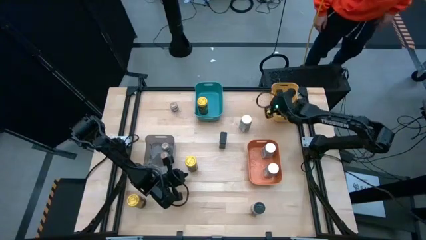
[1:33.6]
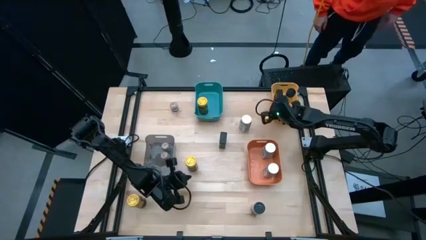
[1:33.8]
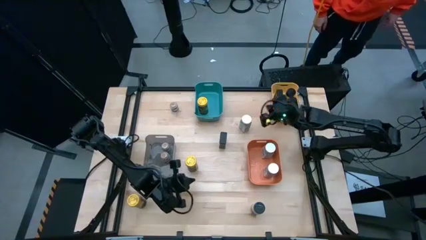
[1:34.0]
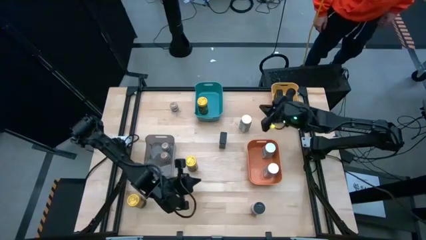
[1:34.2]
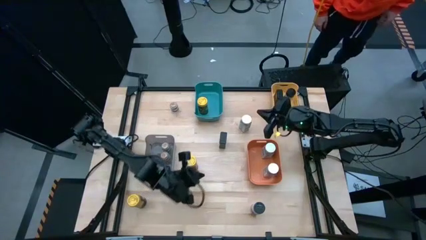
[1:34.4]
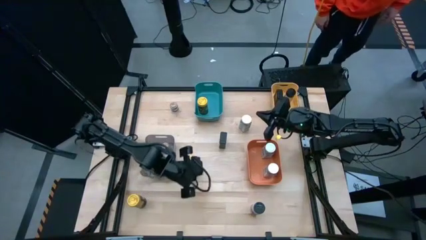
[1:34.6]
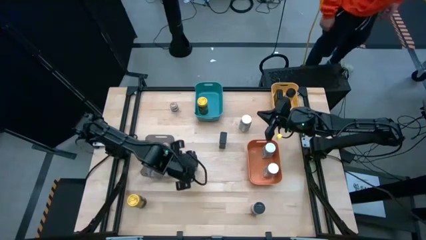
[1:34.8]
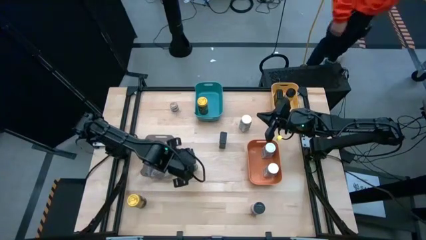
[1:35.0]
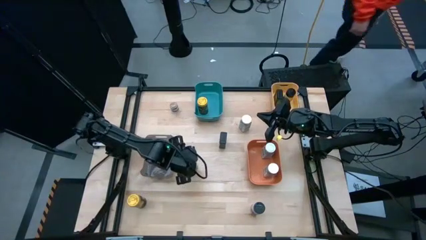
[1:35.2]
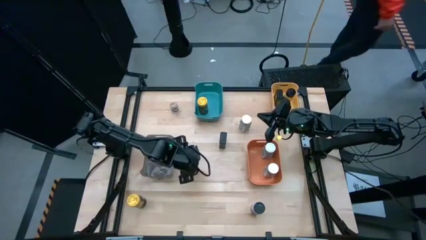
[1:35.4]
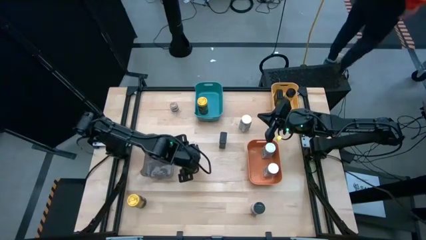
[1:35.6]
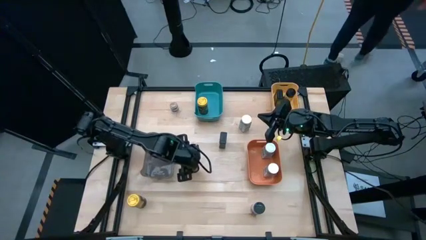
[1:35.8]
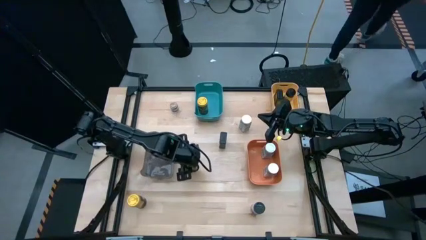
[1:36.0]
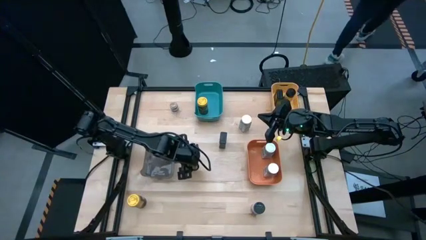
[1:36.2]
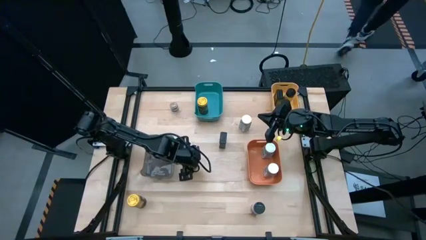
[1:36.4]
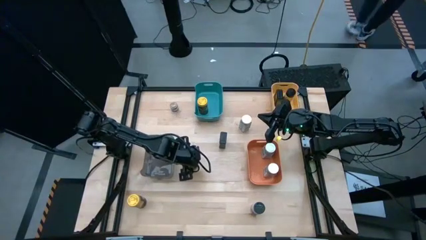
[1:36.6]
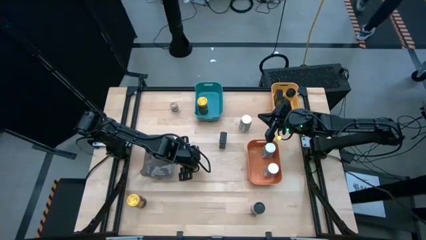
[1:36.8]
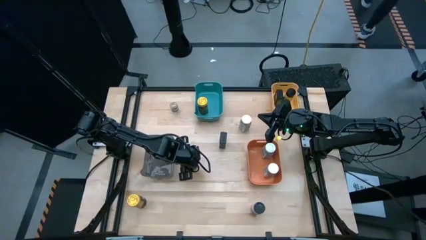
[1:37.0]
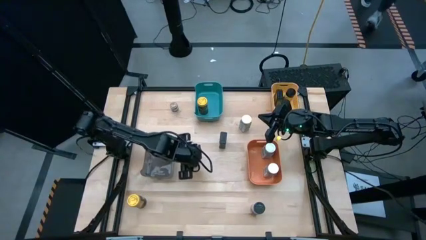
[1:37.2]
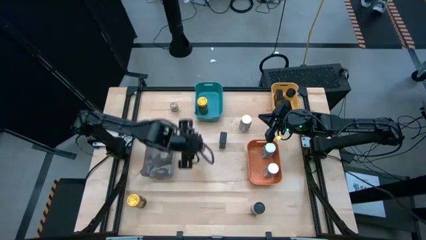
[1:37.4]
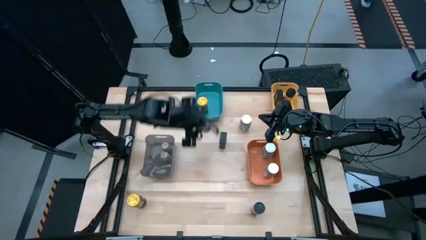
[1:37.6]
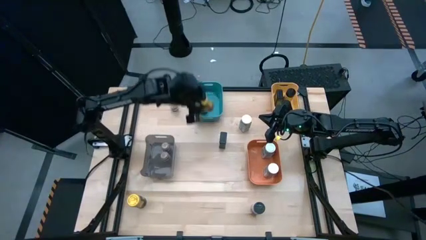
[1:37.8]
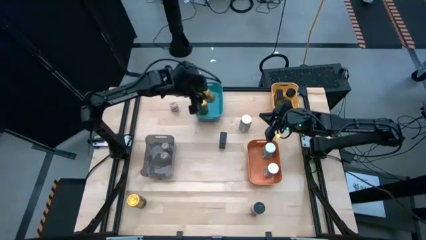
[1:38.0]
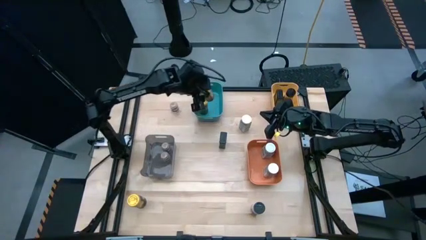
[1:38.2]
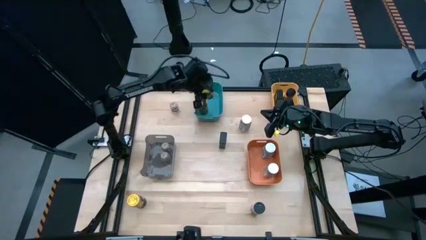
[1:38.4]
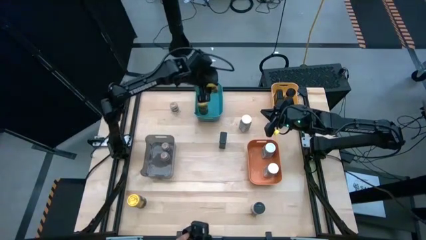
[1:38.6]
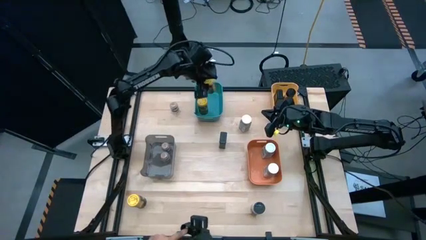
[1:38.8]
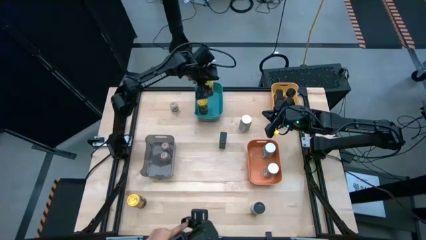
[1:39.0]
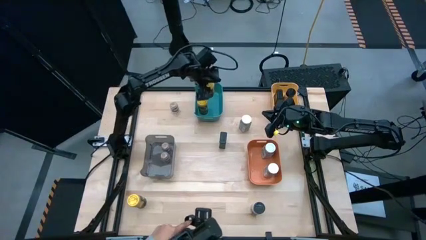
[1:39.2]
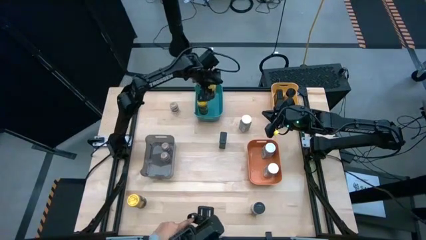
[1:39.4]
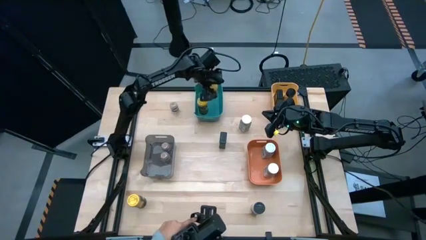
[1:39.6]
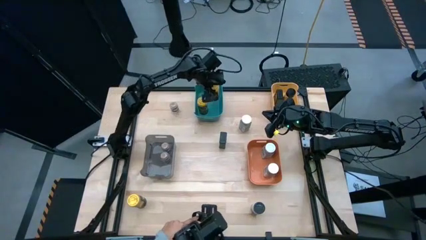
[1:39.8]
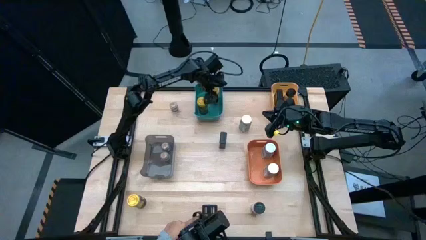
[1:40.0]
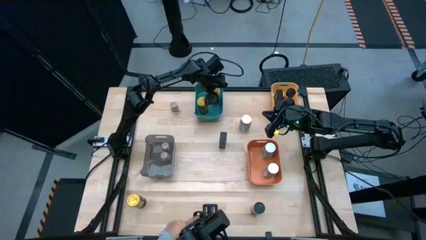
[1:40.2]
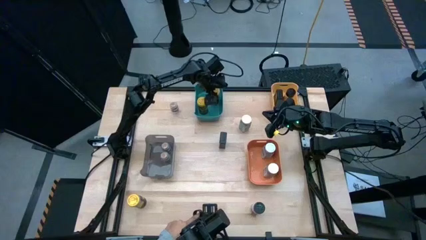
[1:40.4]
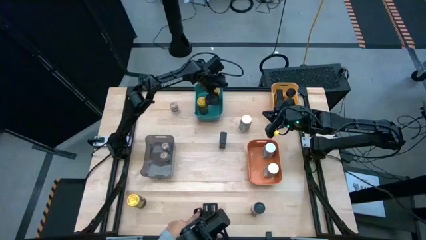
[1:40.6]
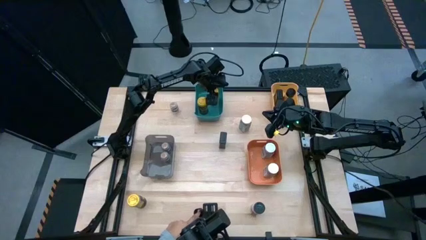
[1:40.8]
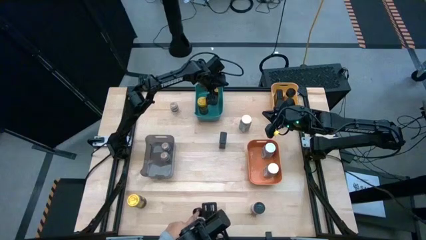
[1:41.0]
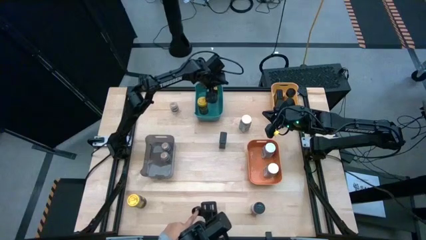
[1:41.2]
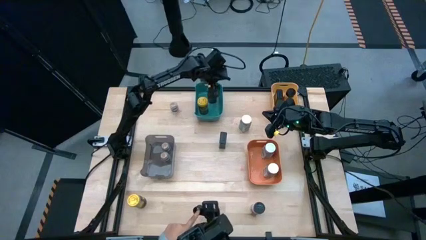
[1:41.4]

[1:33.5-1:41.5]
Task: Sort spices by type
Put the top yellow seasoning bottle into the blue bin

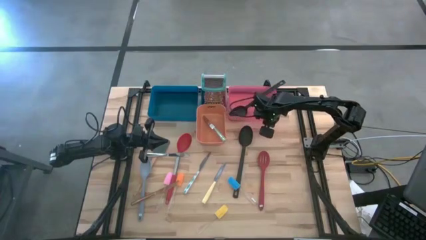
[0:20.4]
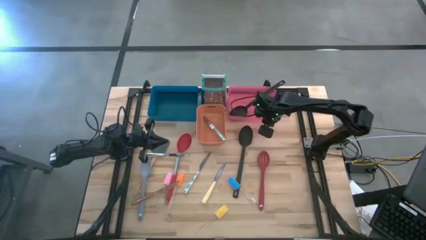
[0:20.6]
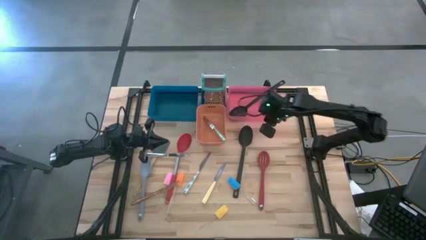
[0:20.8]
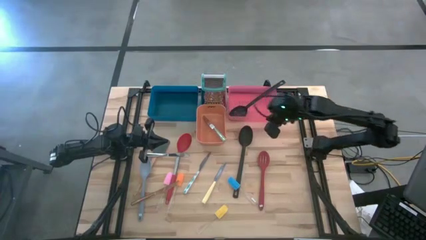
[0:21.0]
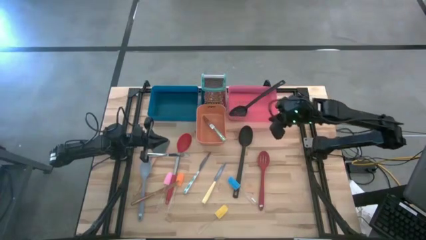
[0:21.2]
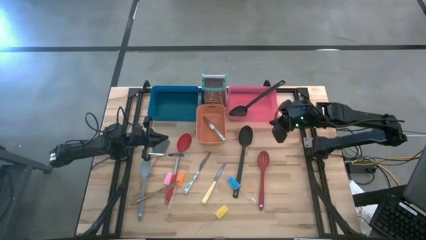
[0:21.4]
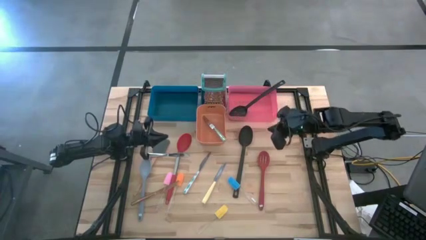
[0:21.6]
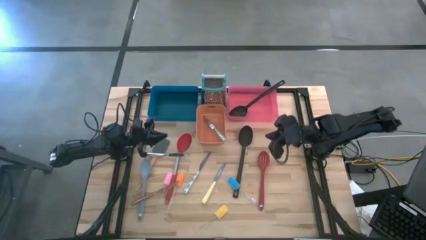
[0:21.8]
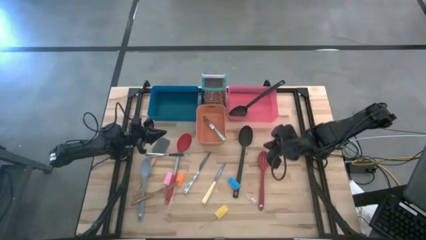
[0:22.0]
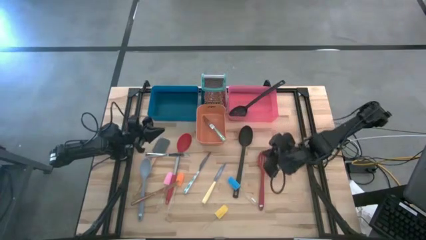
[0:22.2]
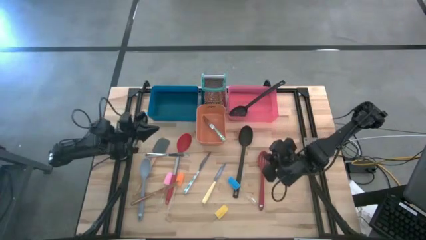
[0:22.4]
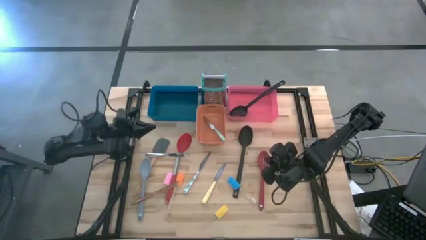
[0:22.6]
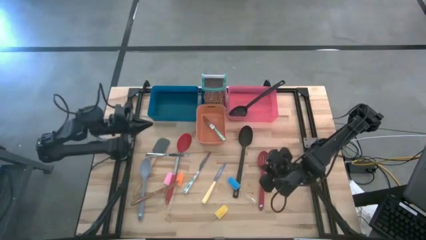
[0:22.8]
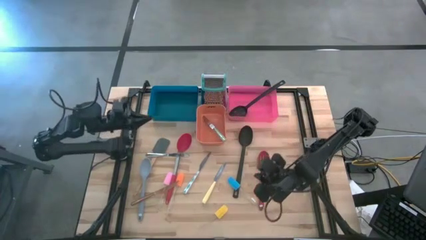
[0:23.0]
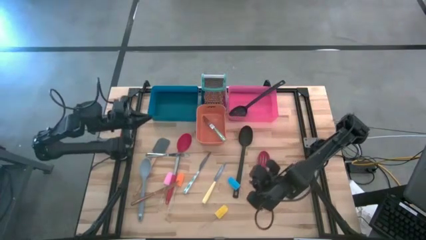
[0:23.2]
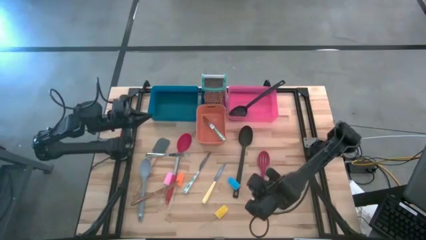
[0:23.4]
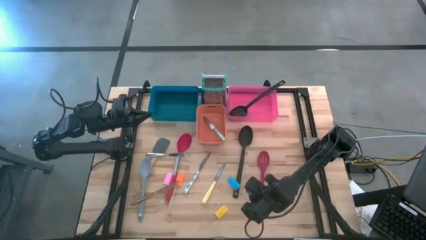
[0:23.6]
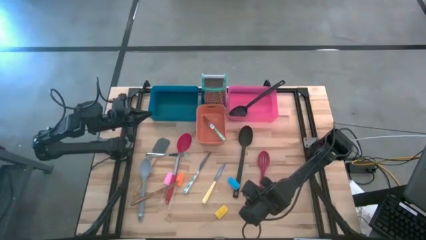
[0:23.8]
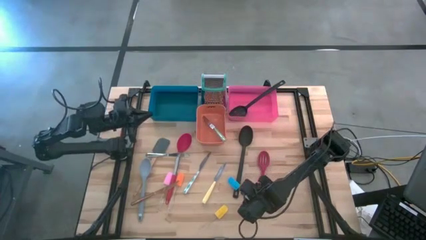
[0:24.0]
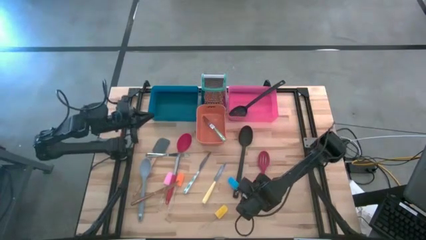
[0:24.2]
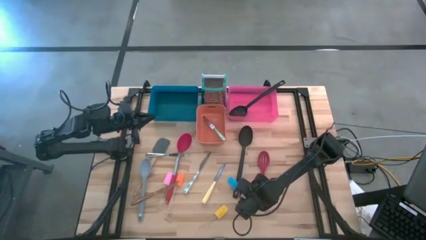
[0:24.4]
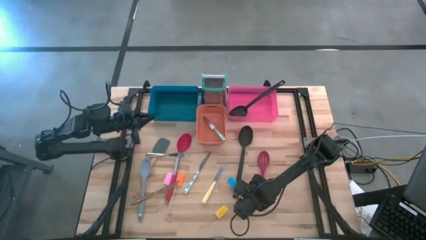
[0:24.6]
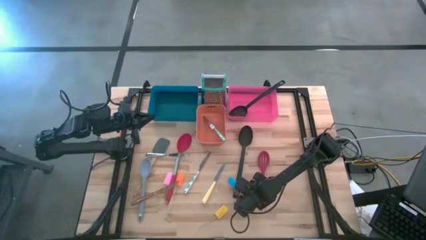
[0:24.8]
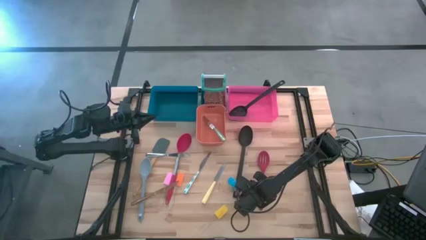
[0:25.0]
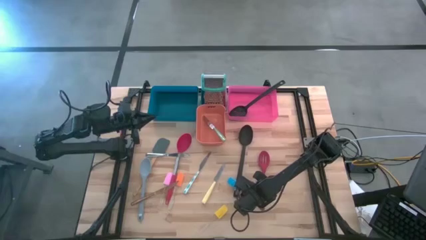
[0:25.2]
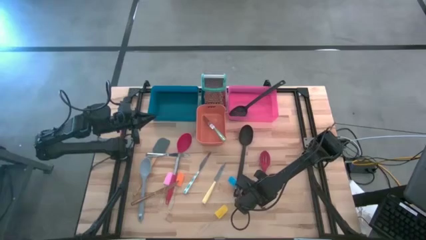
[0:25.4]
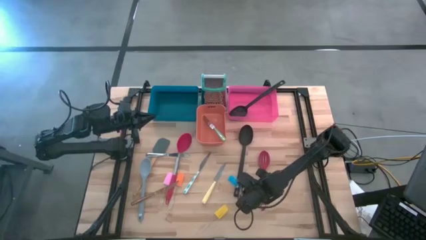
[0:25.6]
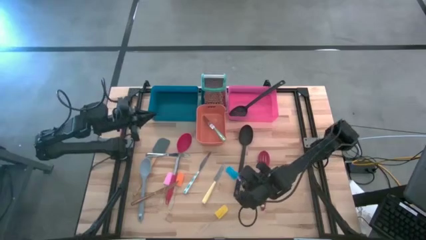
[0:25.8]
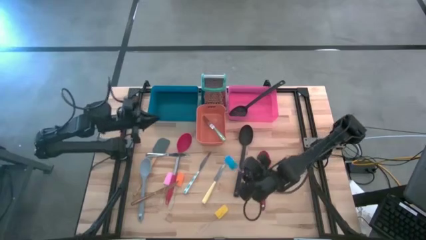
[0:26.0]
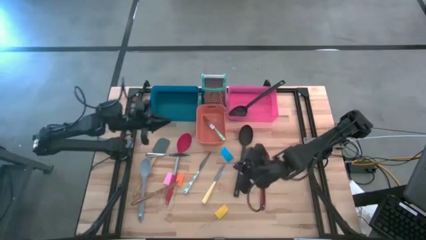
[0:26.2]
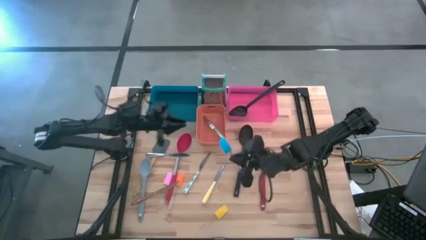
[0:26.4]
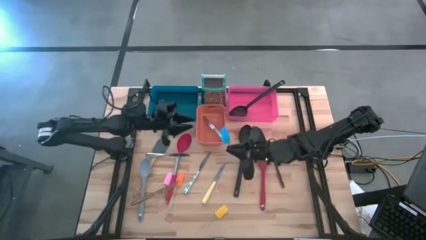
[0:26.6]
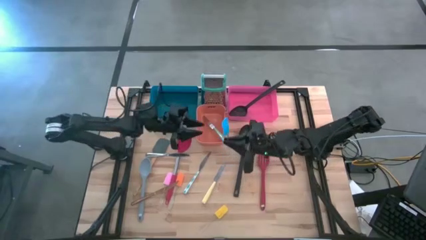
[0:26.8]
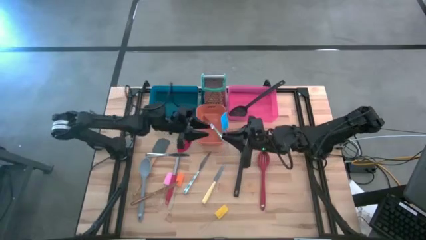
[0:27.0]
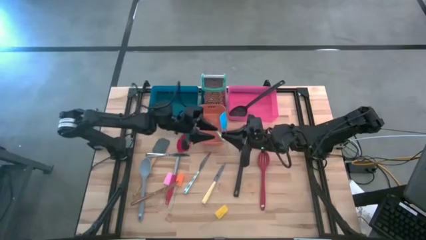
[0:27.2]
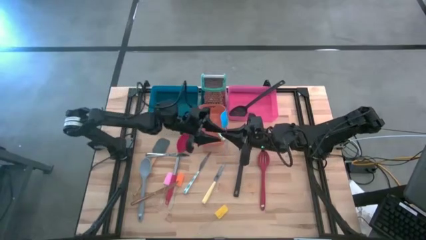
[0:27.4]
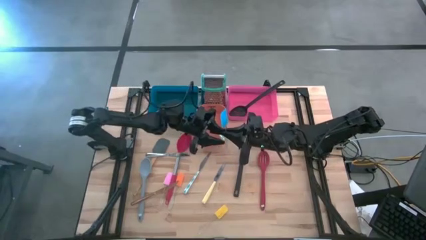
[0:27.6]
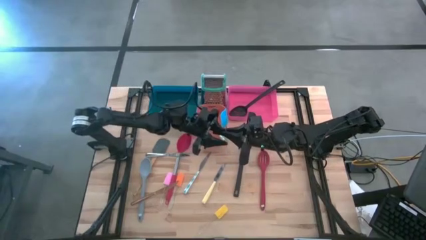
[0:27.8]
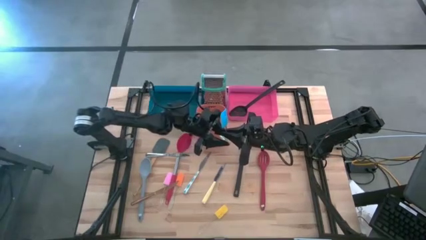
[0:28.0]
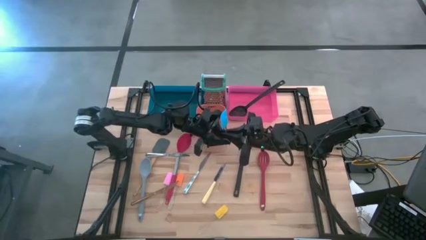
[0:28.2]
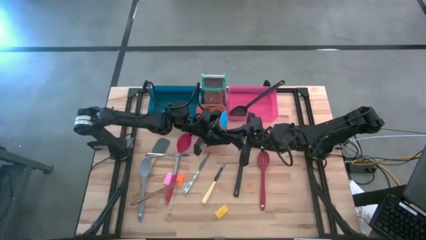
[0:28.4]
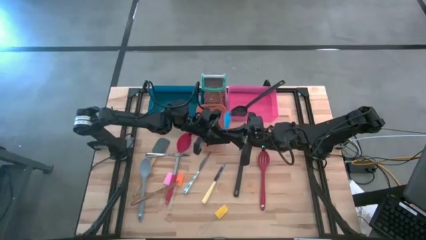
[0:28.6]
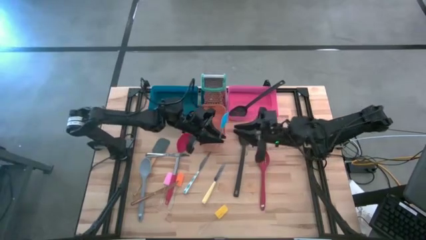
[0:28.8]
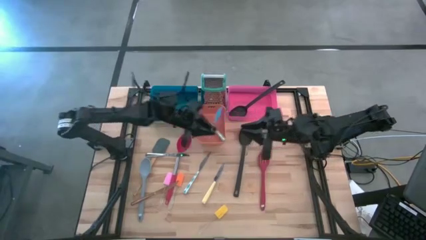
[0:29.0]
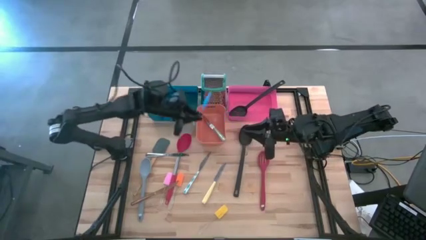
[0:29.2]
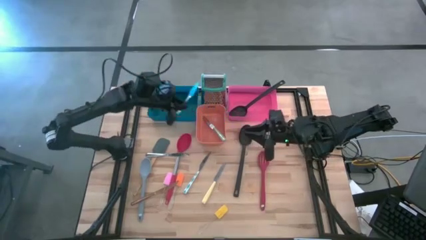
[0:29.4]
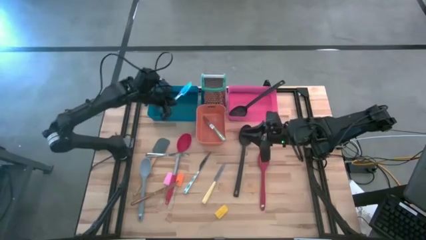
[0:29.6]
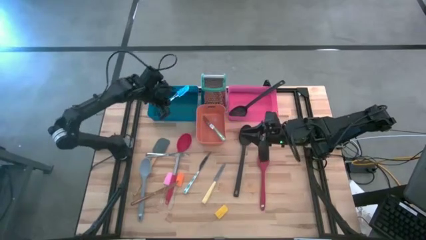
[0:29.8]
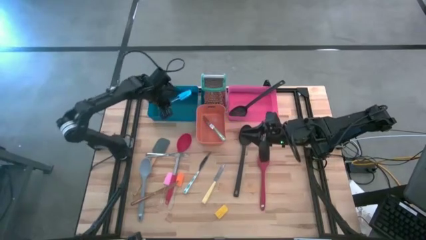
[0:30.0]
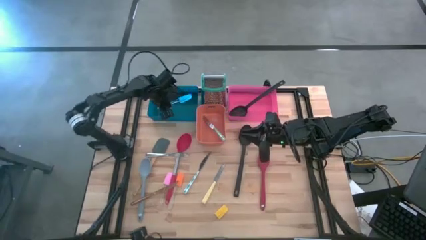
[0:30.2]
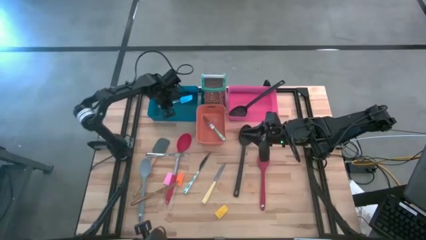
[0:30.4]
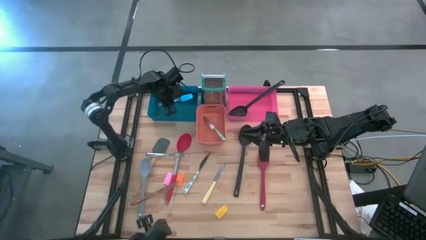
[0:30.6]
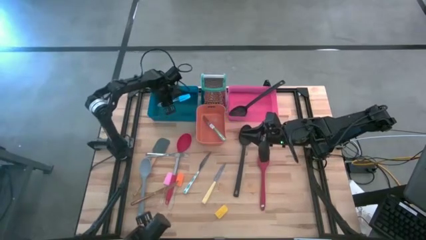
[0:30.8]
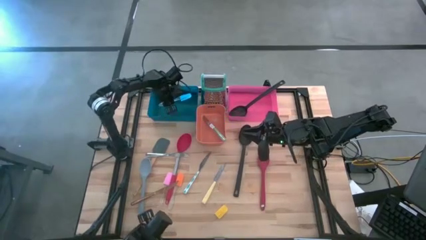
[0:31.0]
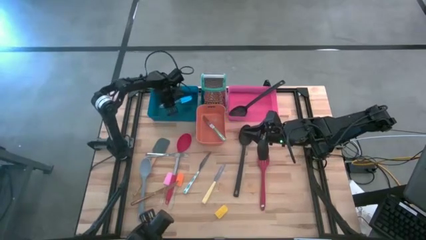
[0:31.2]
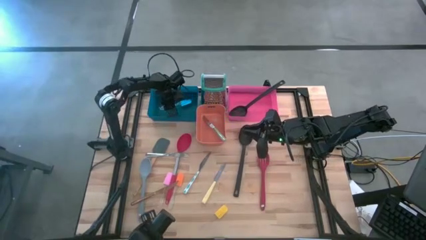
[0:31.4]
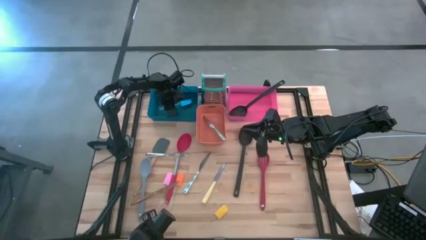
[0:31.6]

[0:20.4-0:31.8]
Task: Pick & Place Kitchen Items
Put the blue spatula into the blue bin
